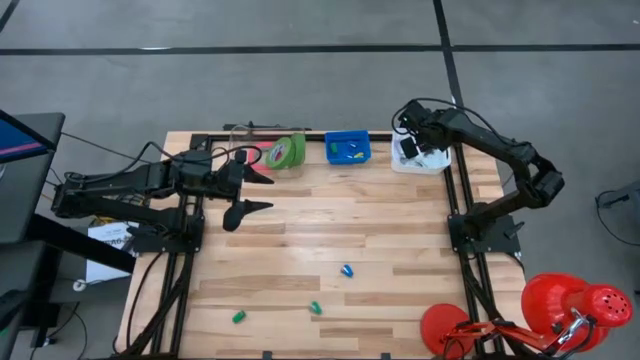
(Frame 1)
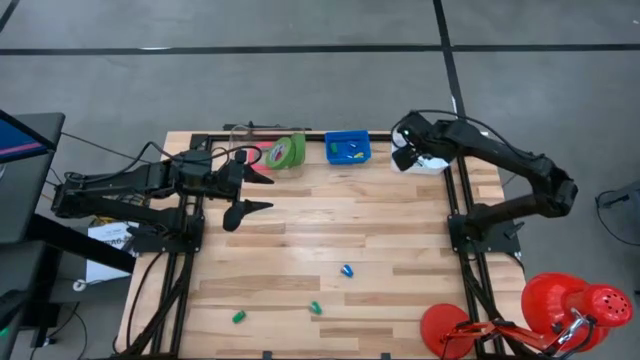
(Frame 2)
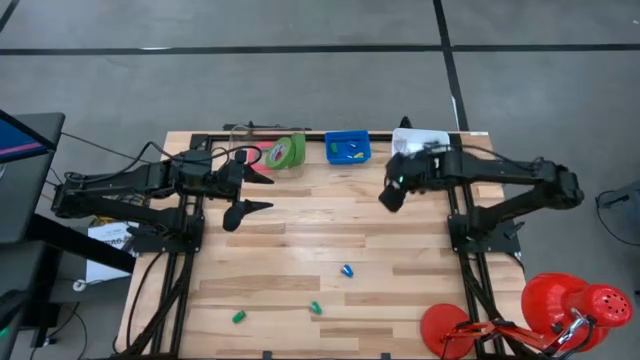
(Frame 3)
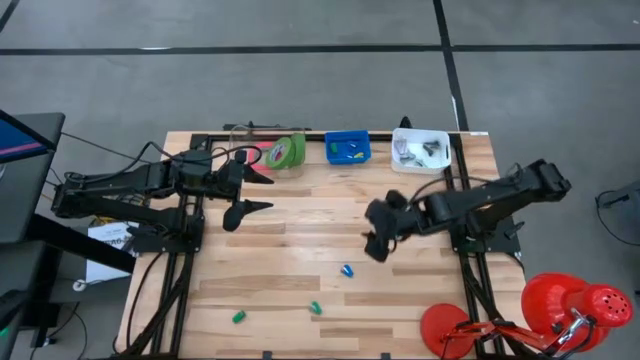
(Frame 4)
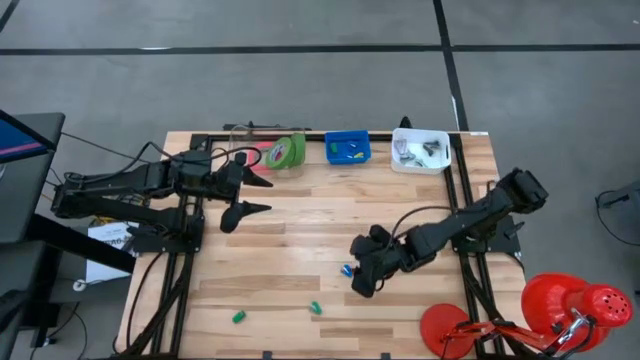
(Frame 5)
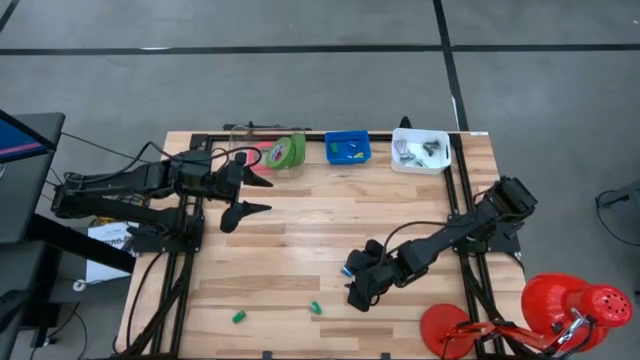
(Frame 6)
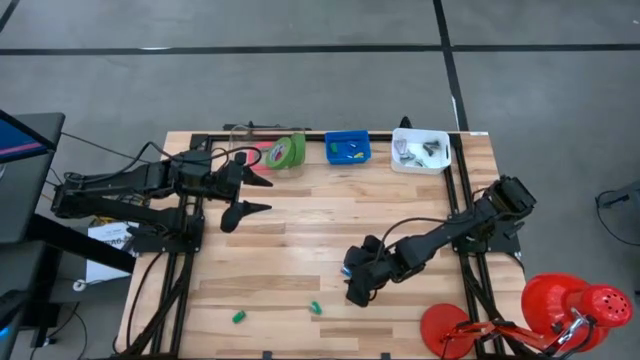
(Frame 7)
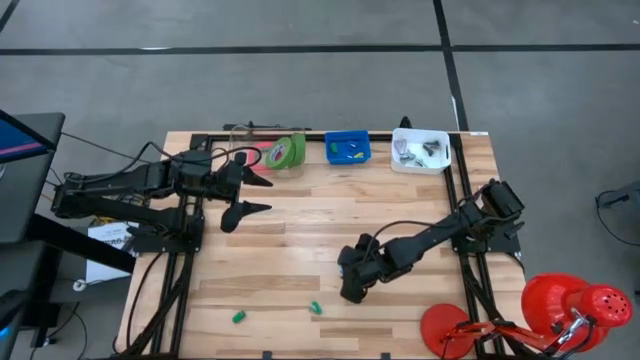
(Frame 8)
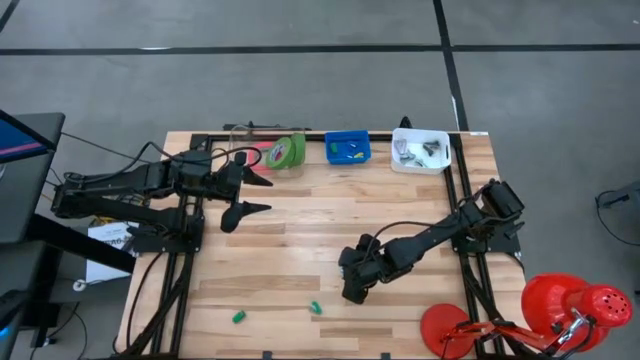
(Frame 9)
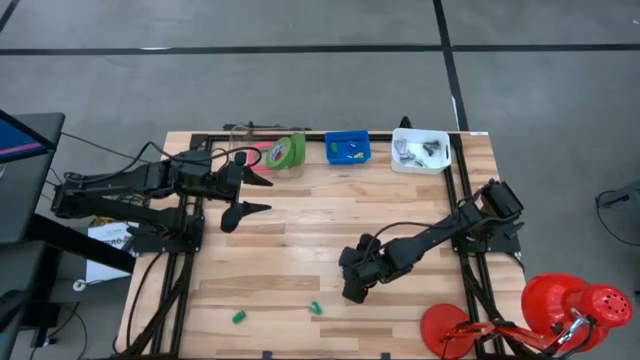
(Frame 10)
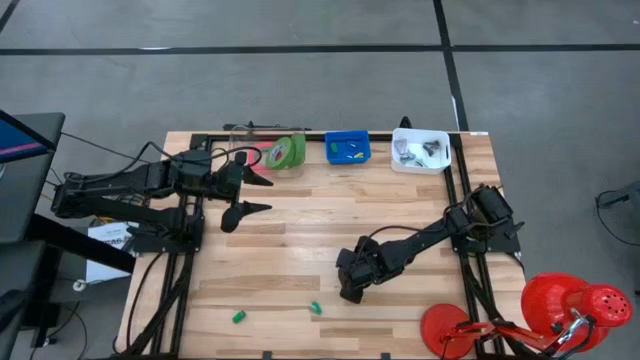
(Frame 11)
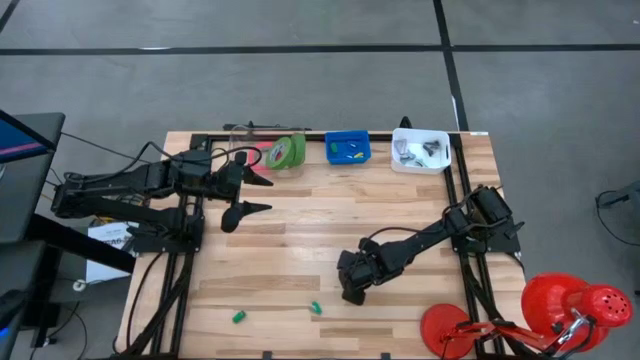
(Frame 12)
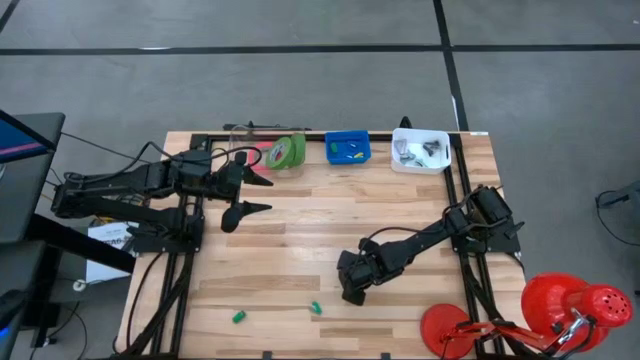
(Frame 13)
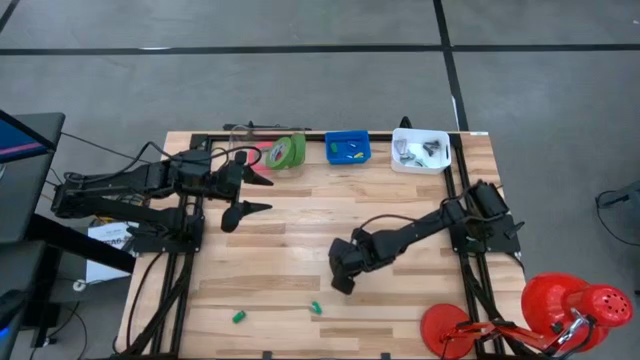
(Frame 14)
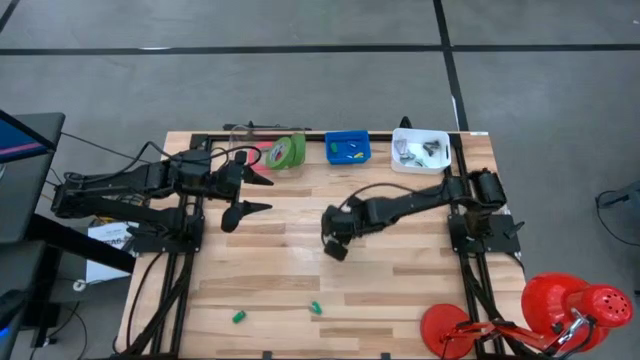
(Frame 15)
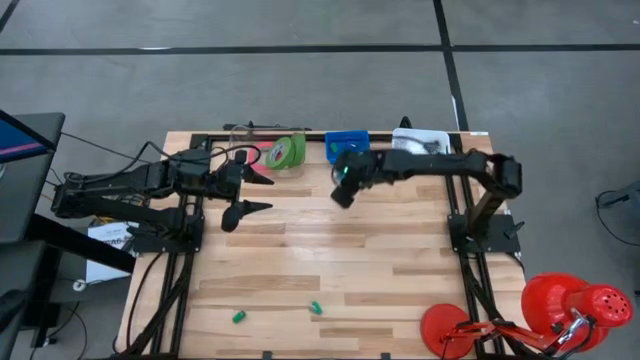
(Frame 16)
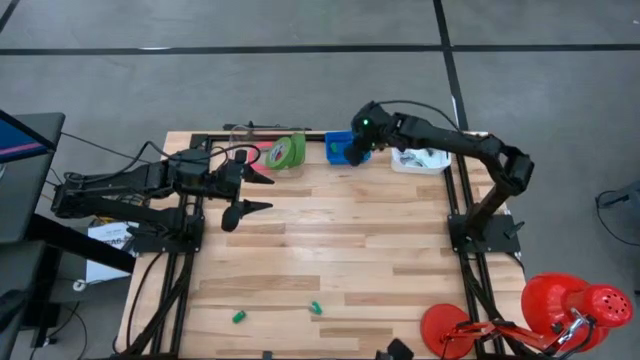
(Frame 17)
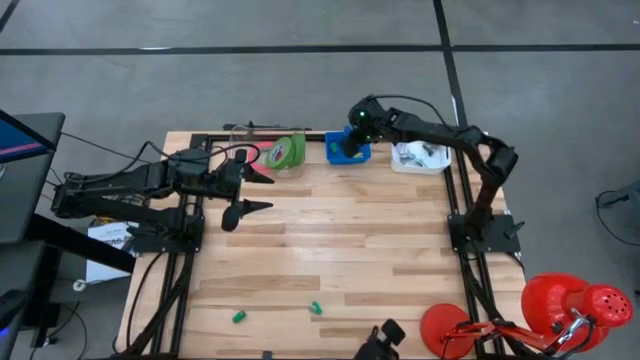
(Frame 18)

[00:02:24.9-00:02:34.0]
Task: Pick and place Stapler, Stapler remover, tape
Put the blue stapler into the blue bin

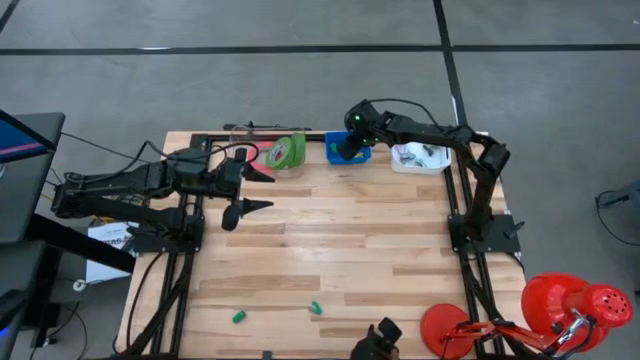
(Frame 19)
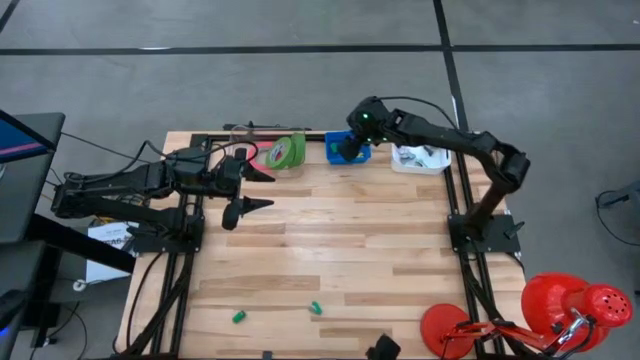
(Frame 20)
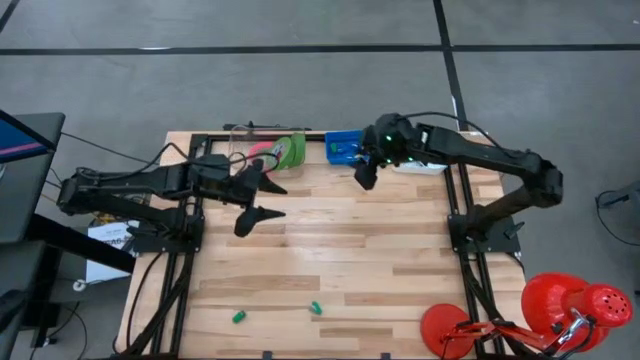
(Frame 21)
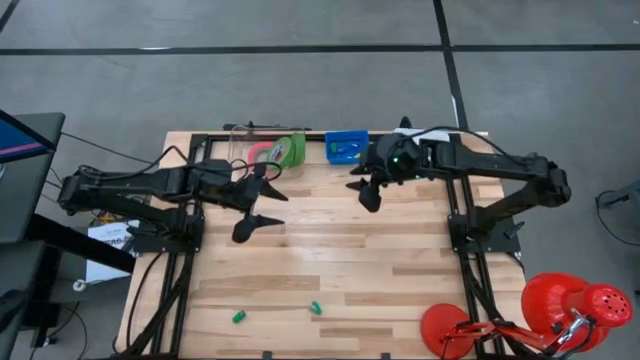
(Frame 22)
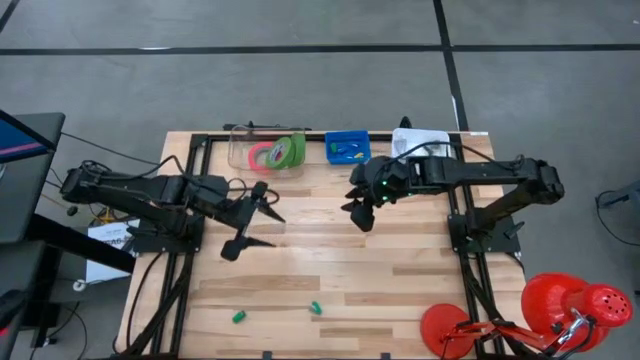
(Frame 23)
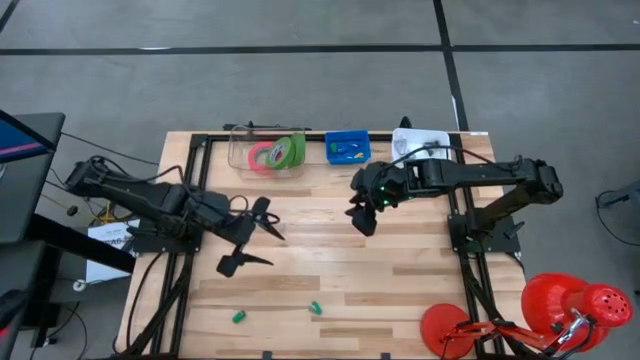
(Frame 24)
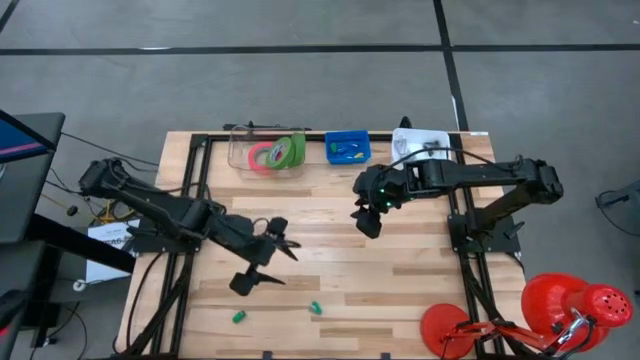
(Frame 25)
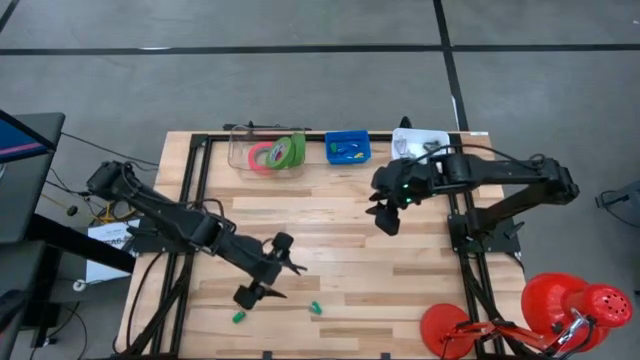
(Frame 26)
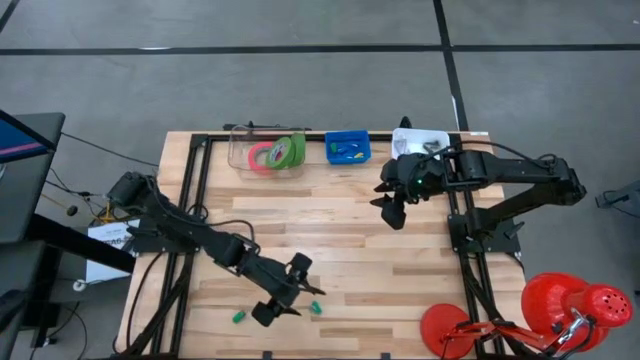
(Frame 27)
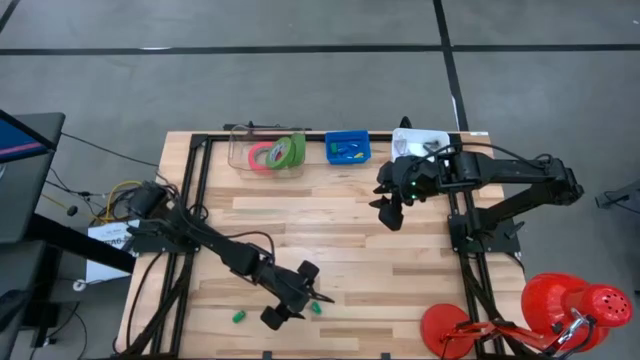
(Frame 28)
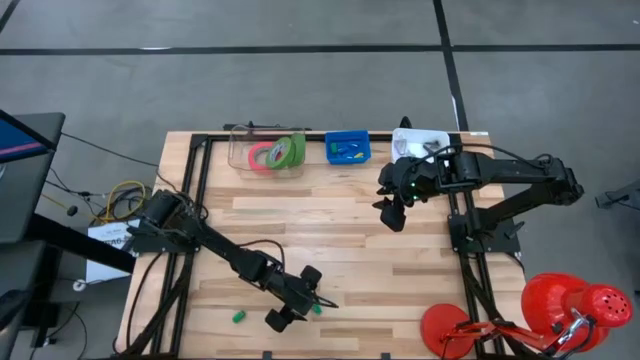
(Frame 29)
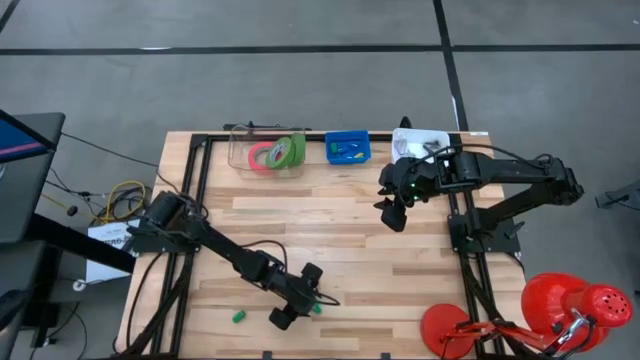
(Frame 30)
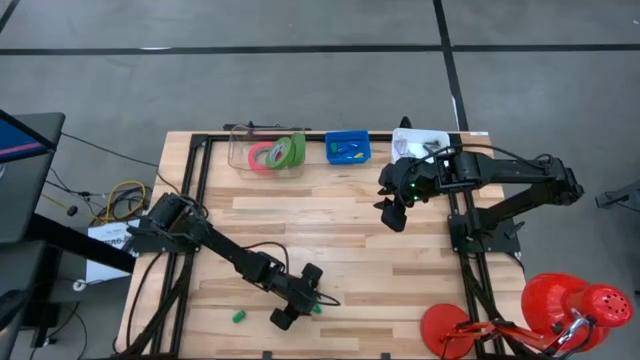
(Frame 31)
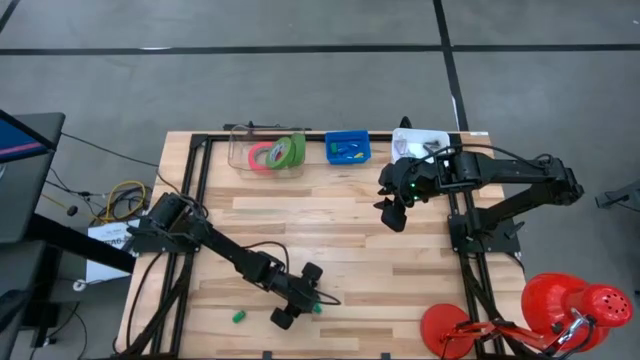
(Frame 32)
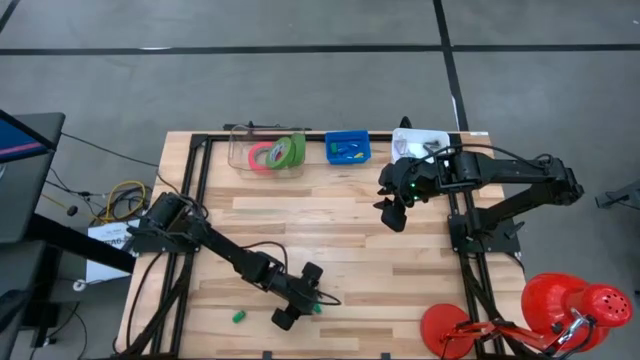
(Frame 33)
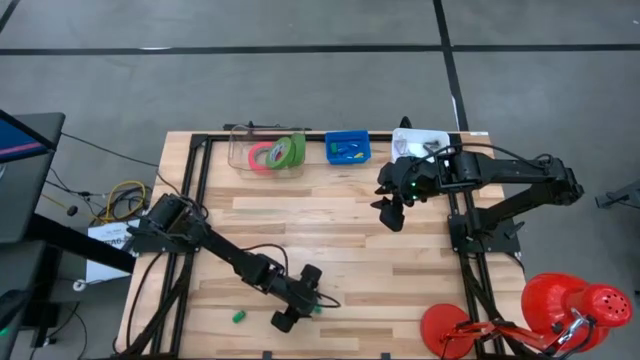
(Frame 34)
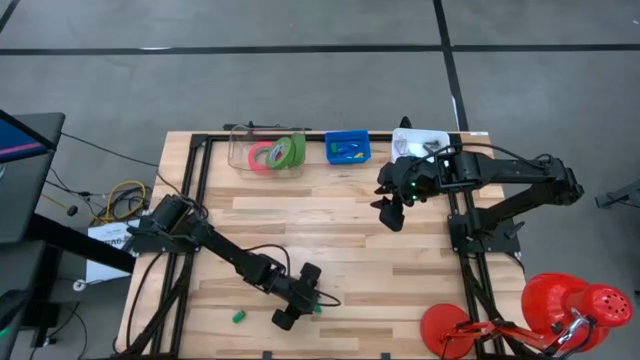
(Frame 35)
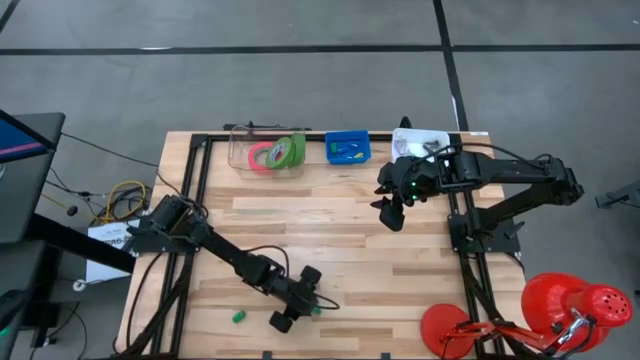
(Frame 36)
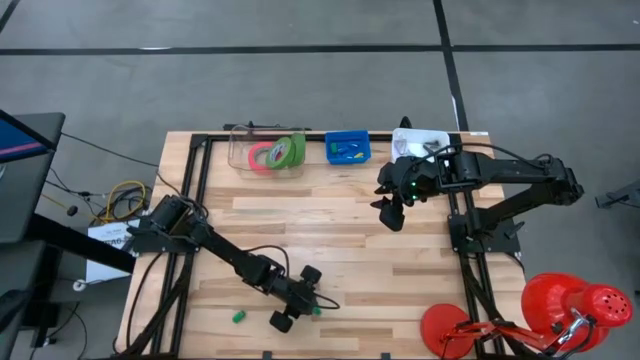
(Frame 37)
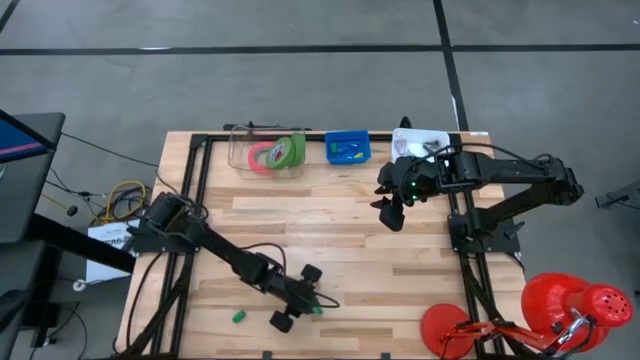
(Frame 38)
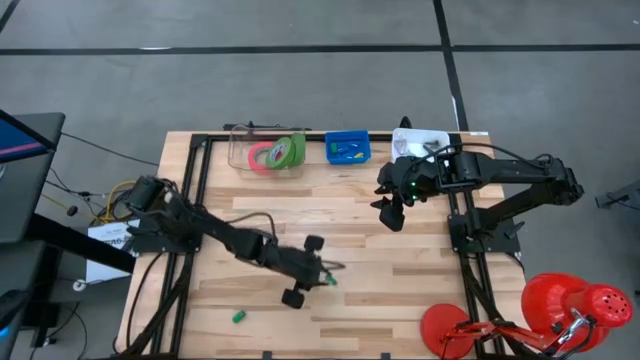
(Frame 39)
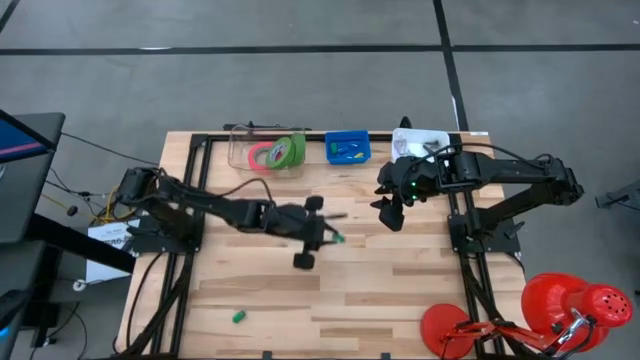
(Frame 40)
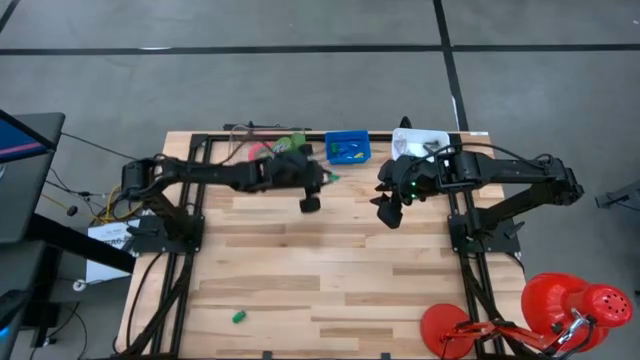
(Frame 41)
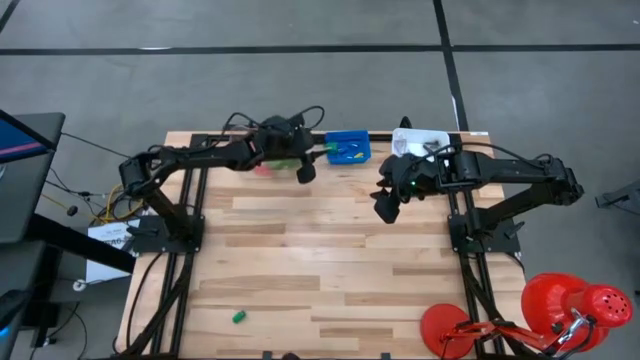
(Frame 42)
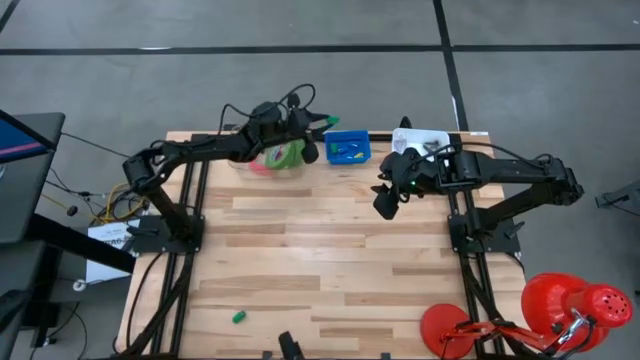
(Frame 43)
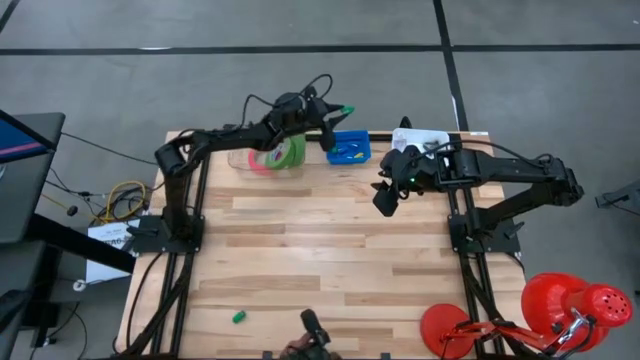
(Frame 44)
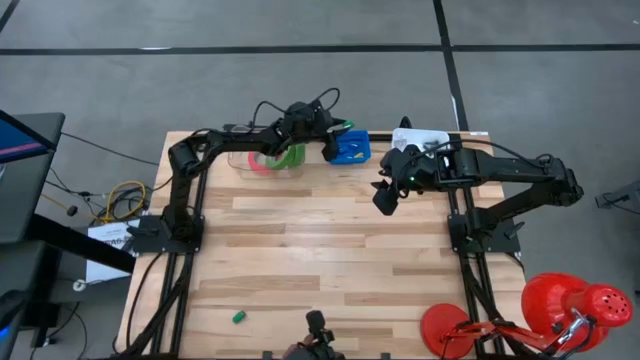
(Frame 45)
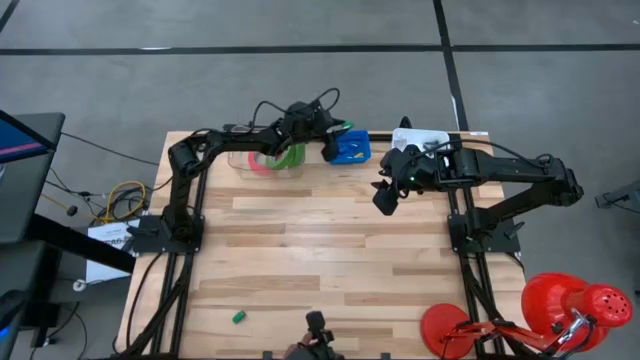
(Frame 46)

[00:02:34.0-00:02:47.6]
Put the green stapler into the blue bin
